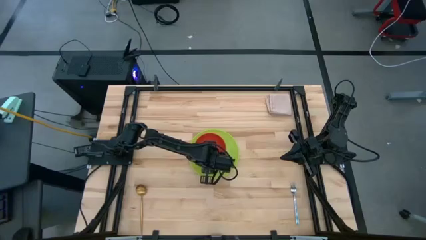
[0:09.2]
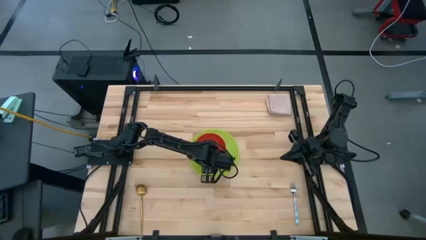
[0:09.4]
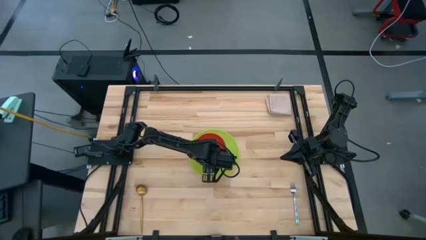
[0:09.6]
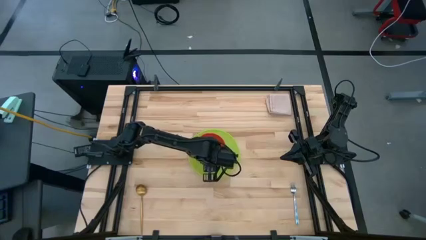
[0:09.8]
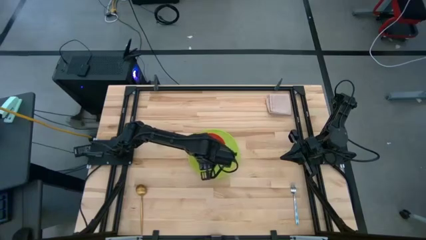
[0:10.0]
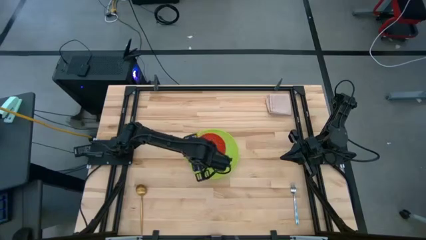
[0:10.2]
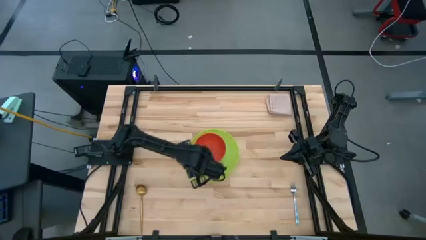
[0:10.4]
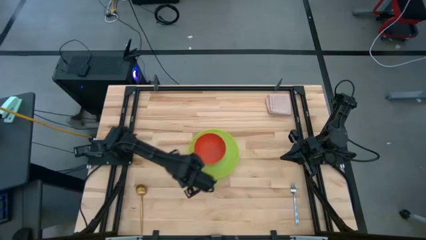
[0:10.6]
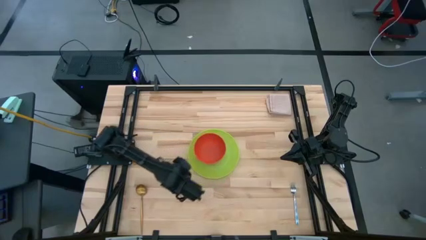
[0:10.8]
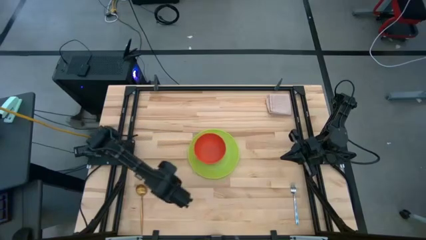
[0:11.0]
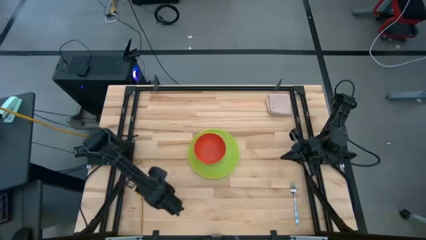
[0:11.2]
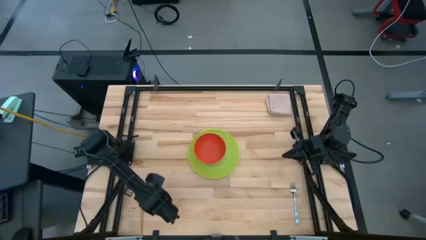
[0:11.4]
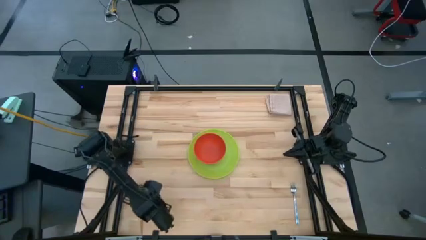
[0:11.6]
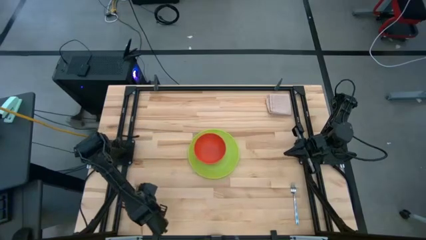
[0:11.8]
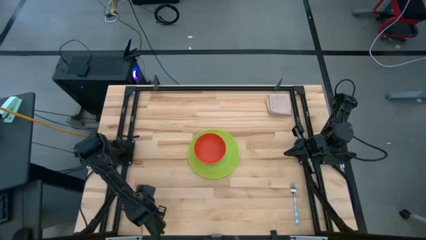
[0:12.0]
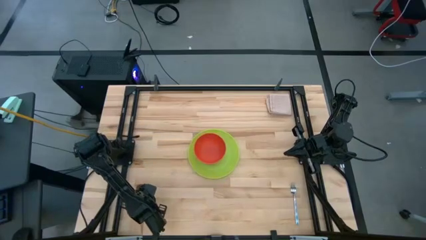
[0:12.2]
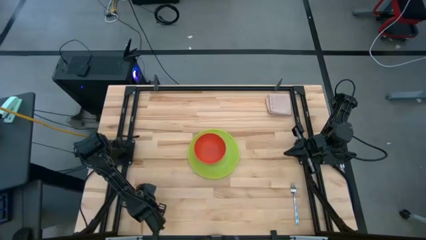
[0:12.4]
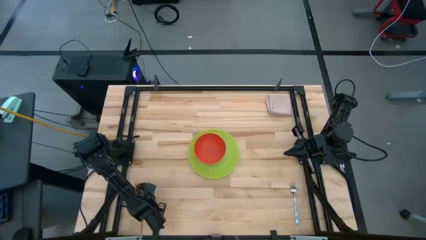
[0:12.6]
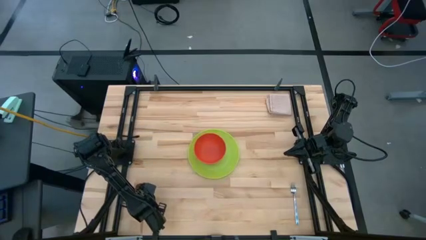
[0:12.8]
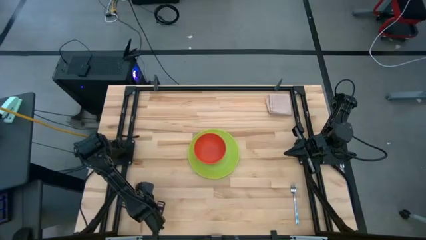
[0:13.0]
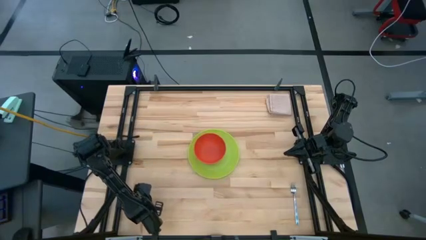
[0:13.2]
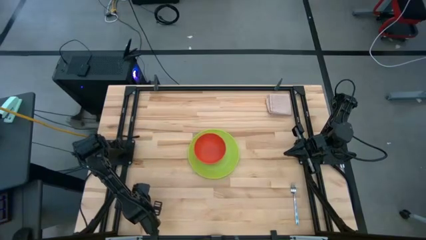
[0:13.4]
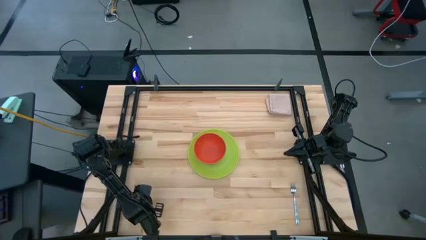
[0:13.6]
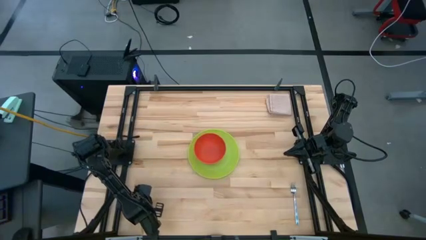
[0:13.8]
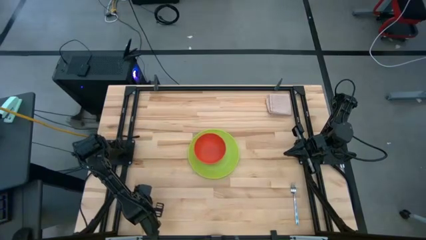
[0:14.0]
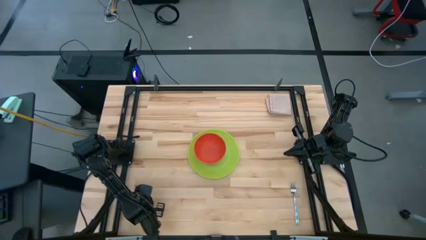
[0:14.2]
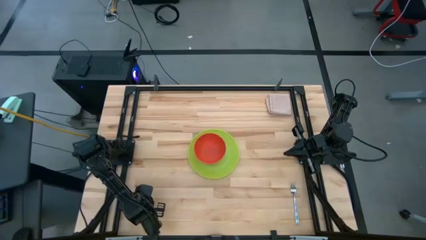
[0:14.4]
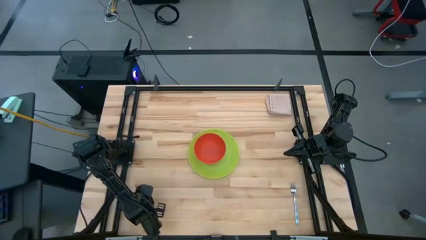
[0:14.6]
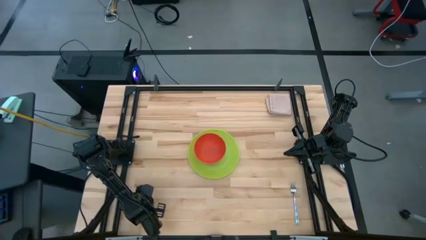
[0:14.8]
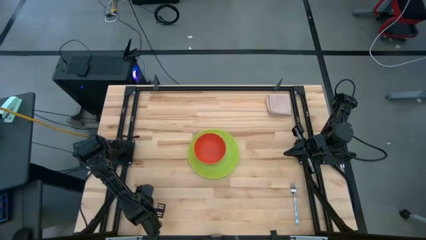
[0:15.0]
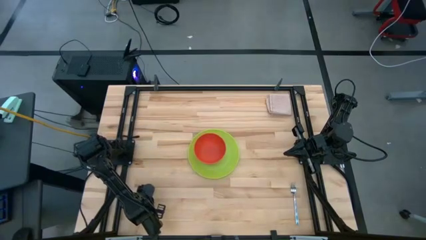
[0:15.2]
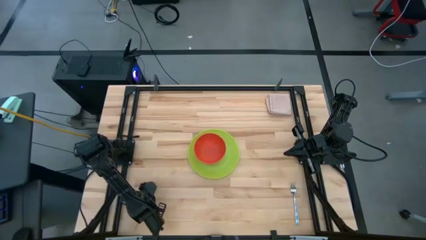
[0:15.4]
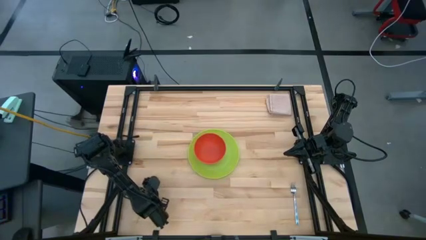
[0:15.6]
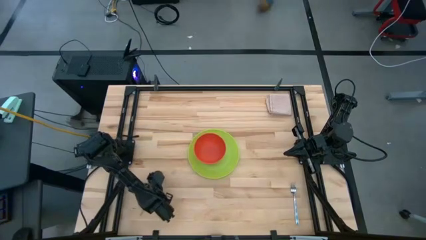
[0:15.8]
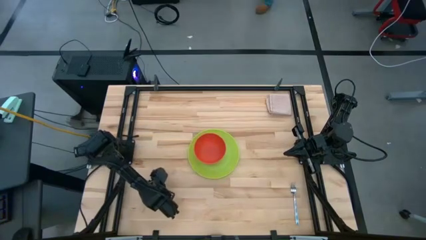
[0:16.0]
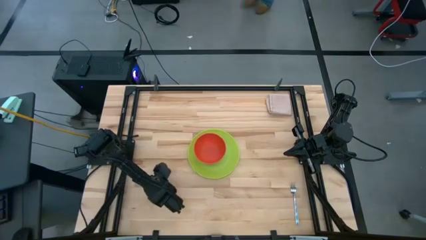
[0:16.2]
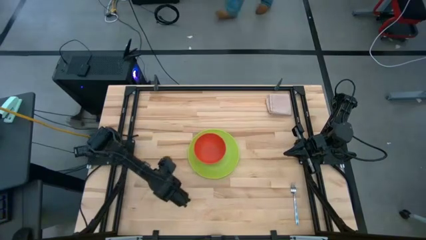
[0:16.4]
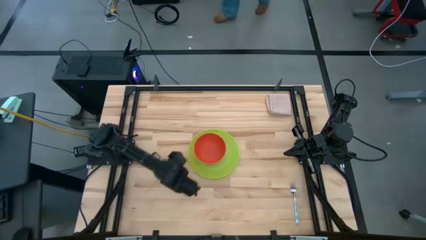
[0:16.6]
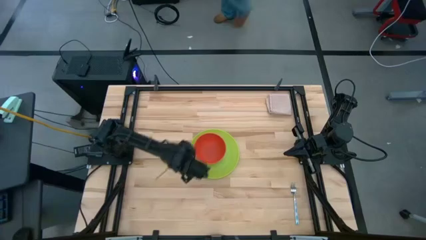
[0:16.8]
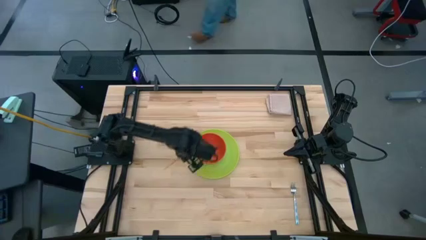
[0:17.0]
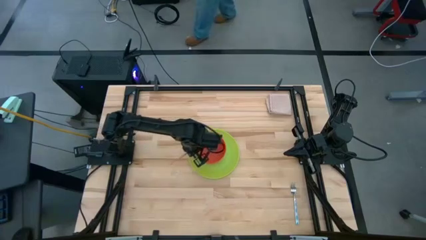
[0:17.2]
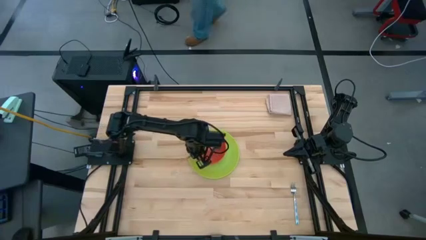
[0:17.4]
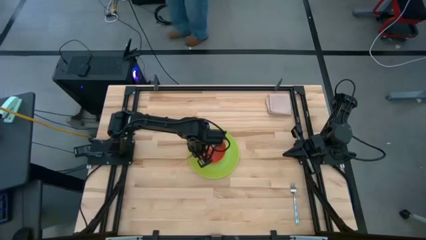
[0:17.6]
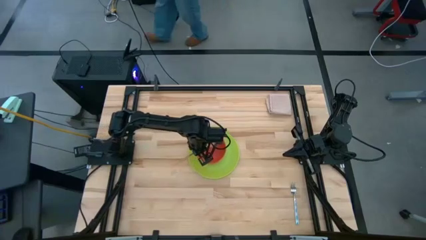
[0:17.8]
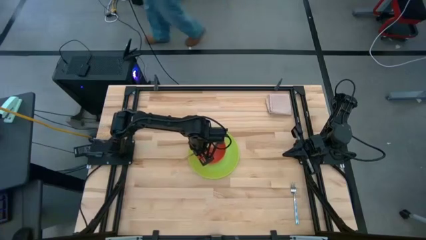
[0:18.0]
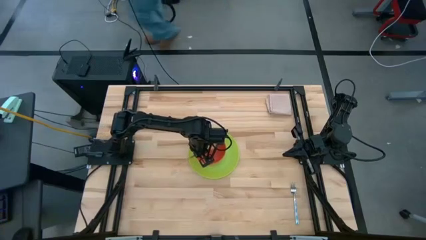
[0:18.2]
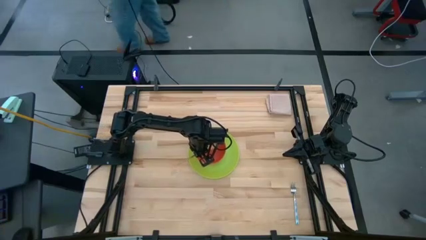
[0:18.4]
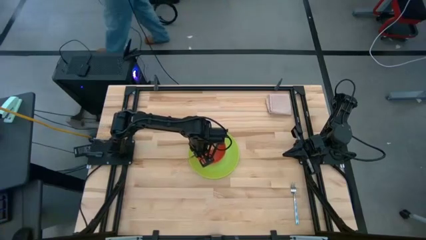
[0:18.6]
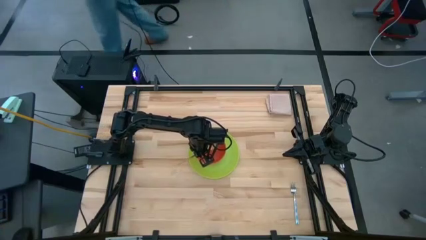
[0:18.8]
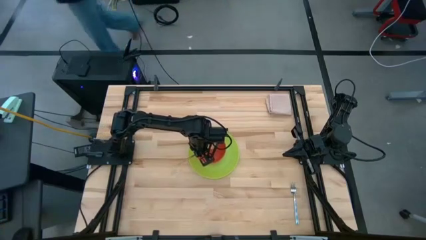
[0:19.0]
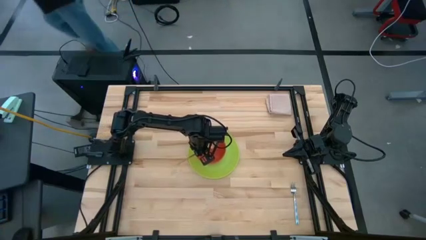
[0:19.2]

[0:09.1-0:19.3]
Task: Pick and place plate/cup/fork/spoon on tray
Put the gold spoon into the orange bowl

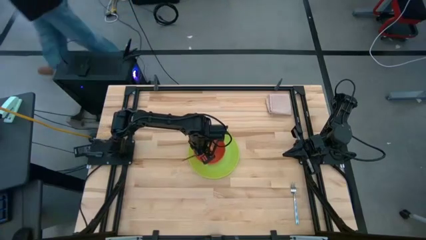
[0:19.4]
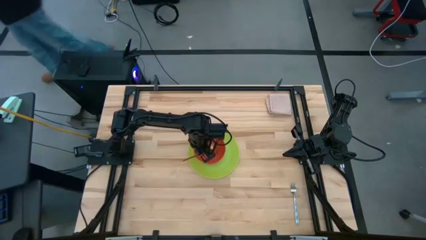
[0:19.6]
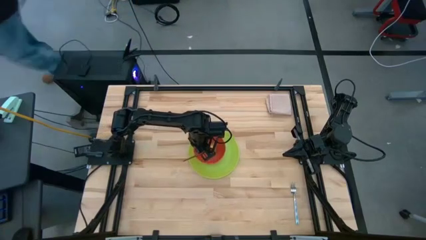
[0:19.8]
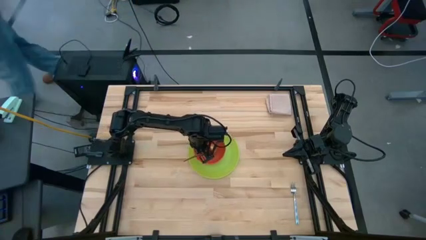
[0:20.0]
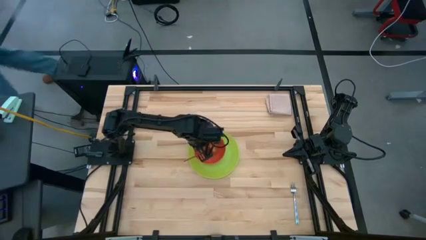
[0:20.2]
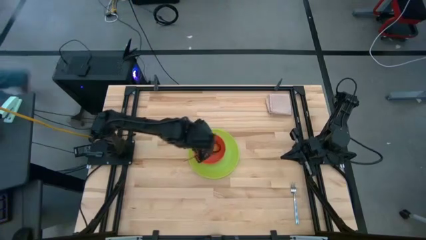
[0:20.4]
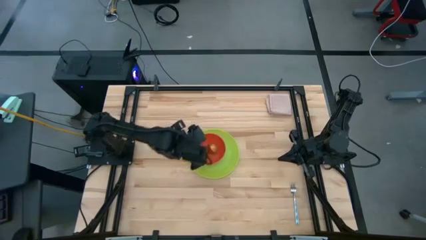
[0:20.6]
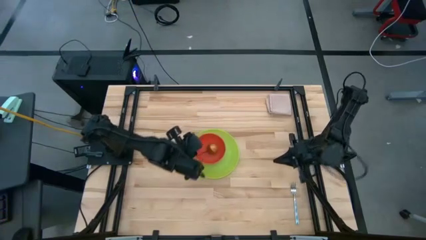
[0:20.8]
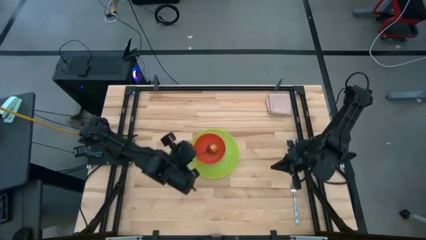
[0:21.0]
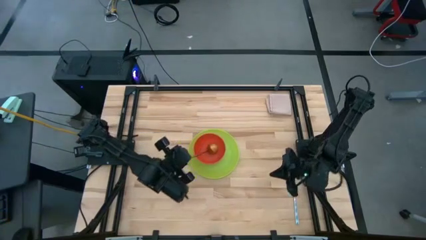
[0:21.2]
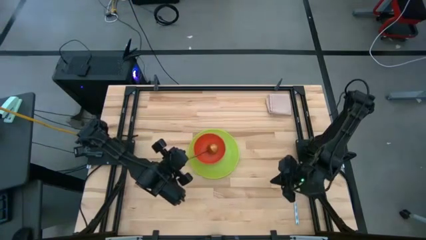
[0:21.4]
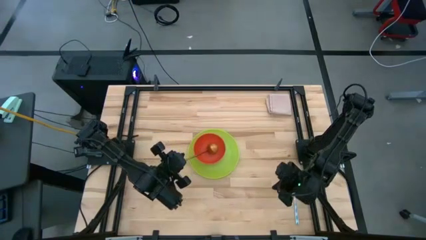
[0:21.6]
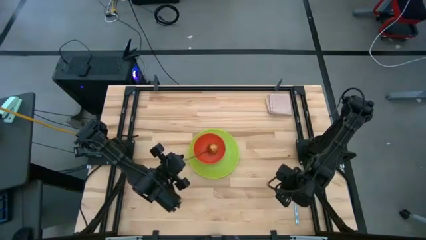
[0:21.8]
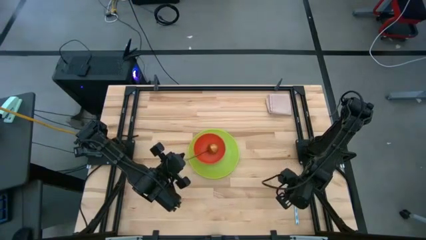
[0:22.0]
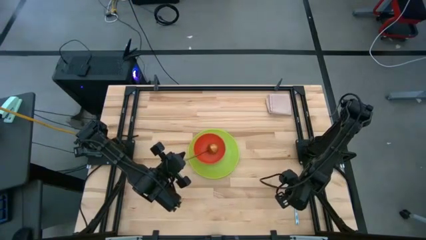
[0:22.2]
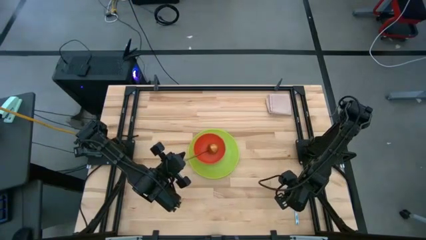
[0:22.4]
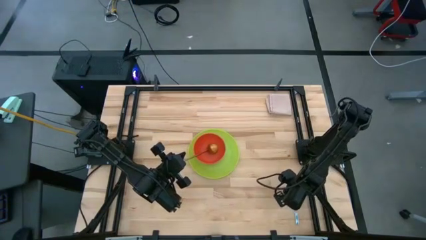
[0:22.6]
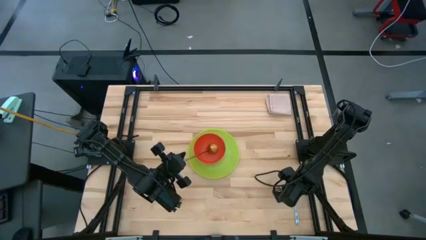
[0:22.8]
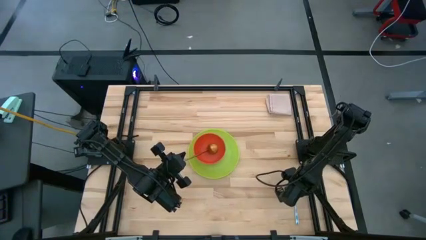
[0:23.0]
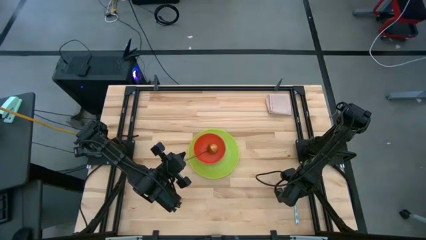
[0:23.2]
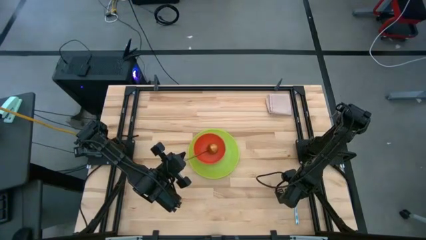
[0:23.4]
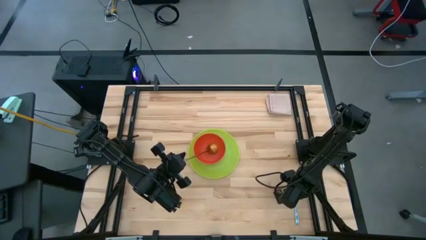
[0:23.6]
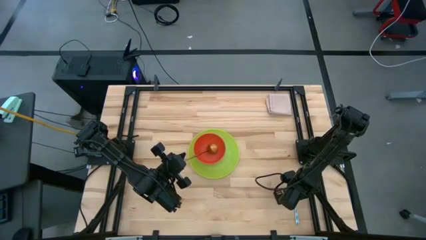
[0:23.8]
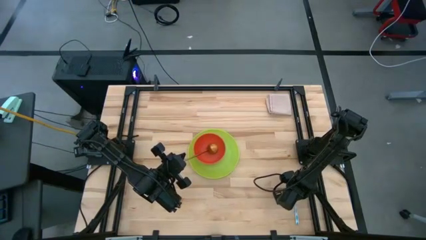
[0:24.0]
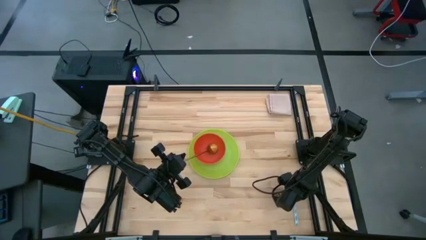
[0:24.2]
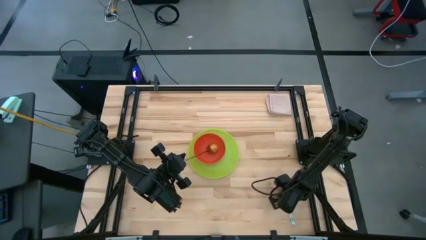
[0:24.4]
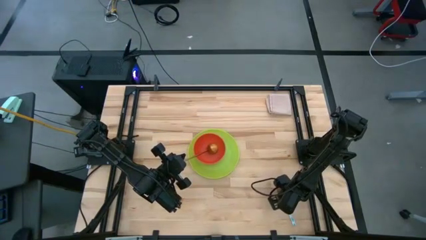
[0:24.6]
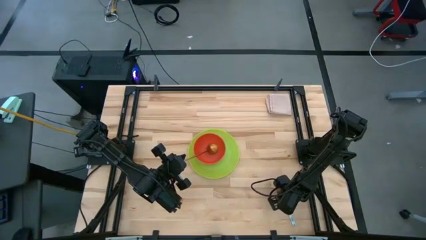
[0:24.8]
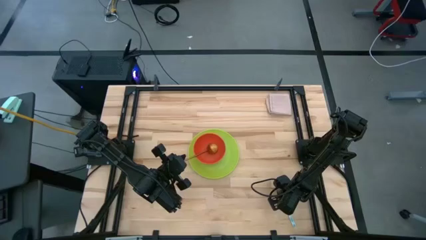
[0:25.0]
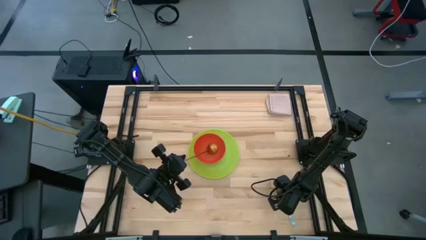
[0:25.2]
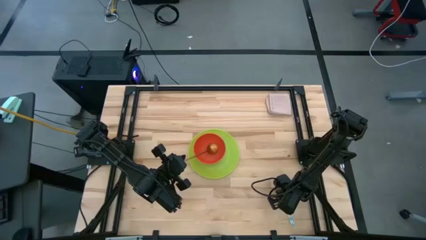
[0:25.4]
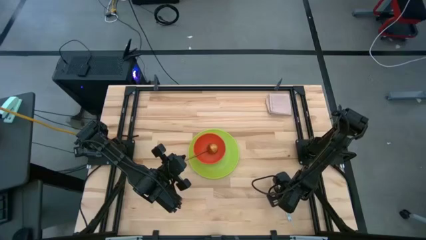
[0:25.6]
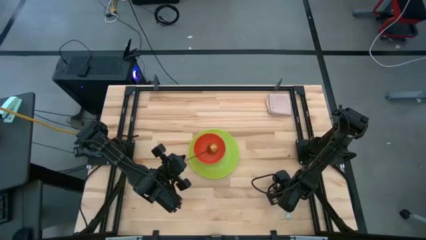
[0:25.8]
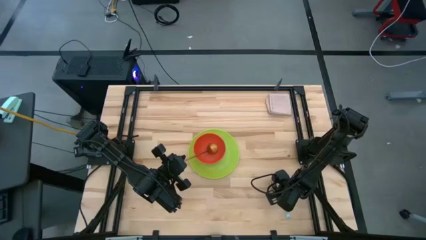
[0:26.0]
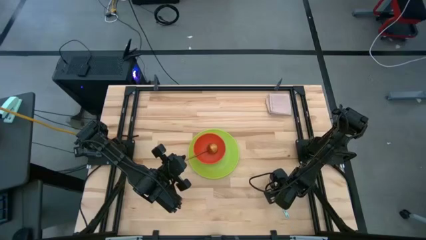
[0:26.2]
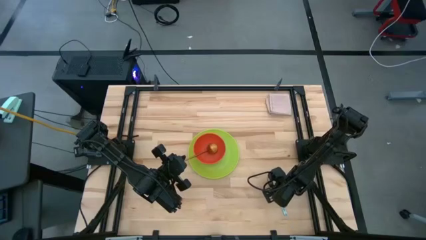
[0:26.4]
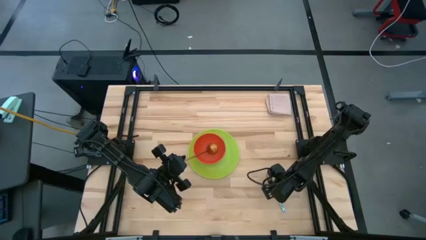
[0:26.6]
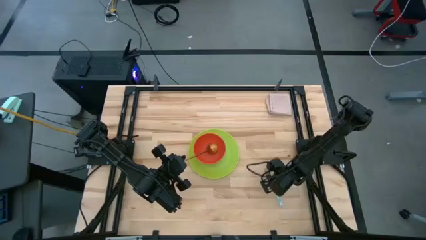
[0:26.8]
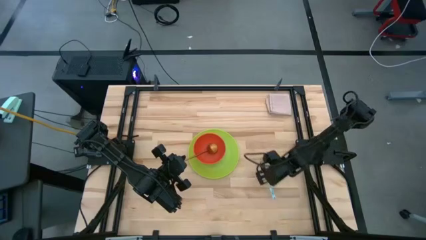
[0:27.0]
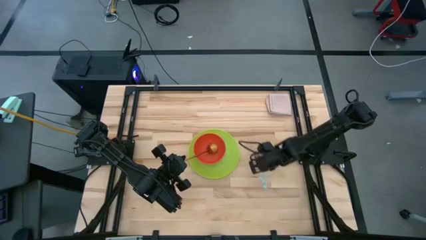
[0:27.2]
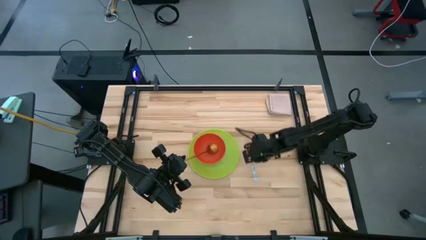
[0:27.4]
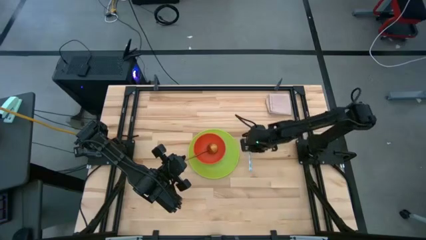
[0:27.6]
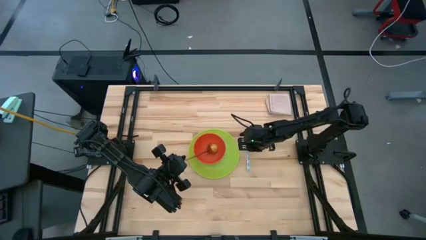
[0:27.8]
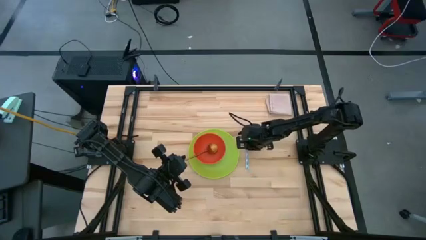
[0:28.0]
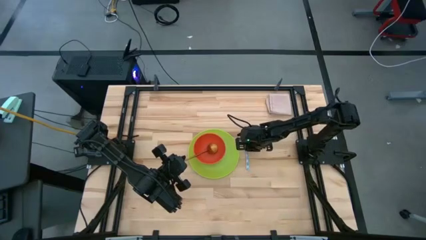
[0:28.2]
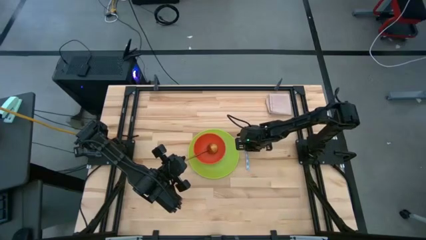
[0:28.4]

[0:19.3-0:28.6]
Put the silver fork beside the green plate on the table
